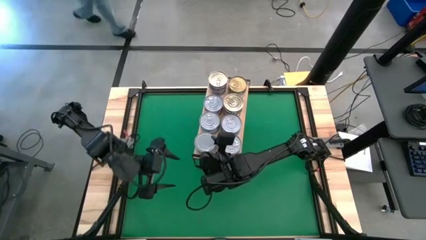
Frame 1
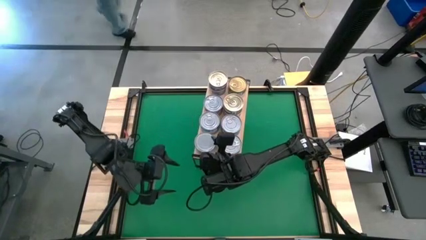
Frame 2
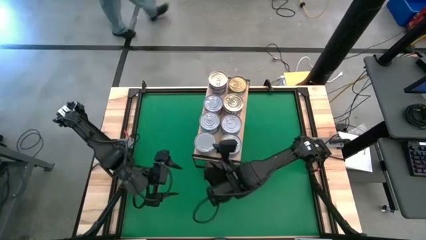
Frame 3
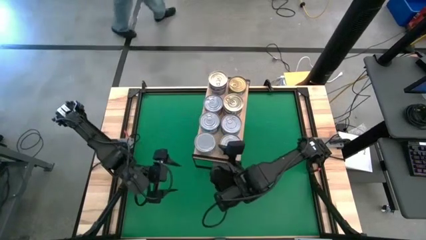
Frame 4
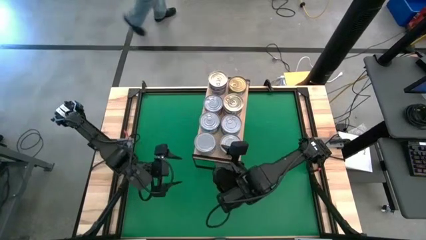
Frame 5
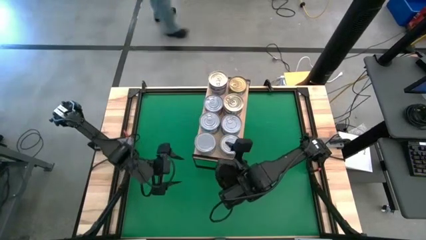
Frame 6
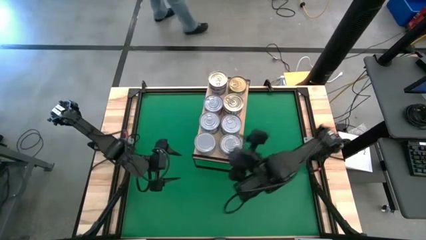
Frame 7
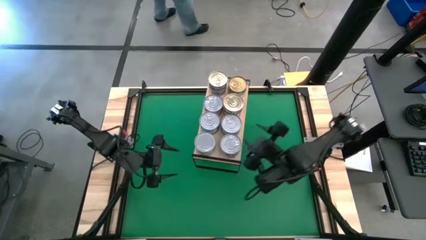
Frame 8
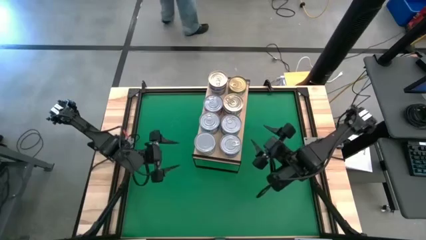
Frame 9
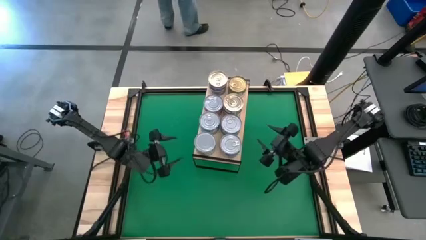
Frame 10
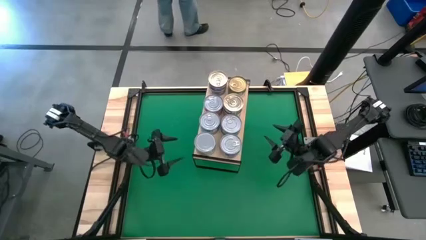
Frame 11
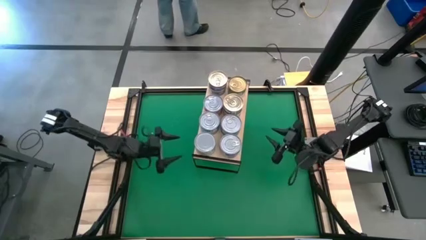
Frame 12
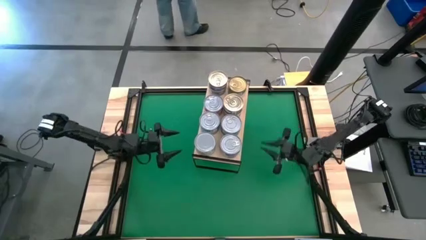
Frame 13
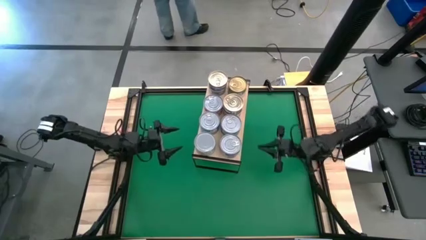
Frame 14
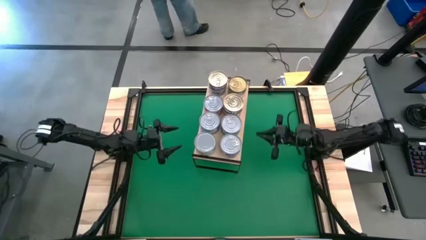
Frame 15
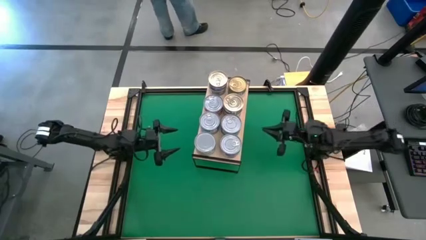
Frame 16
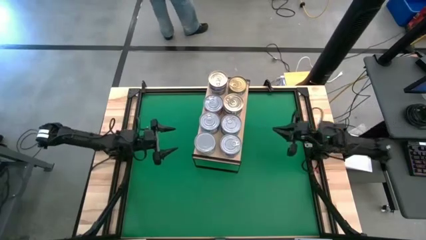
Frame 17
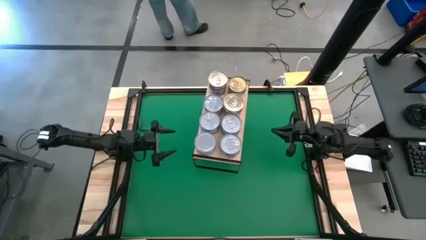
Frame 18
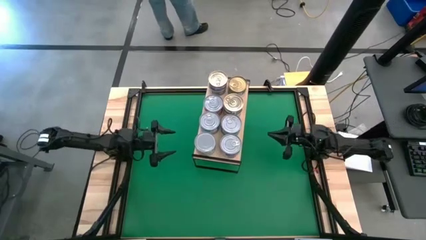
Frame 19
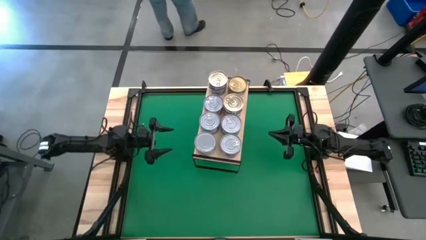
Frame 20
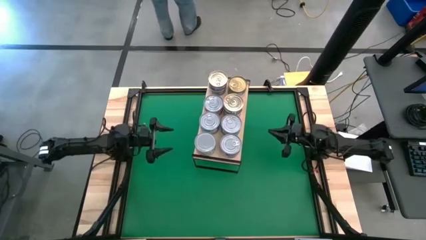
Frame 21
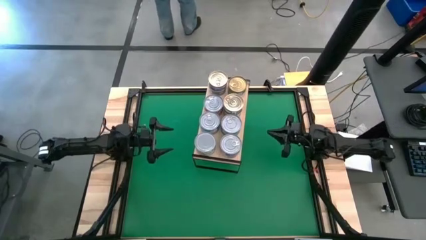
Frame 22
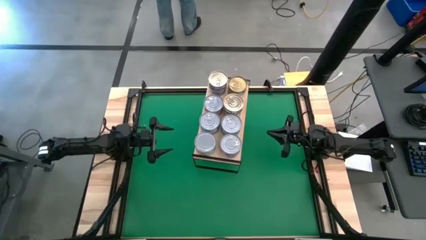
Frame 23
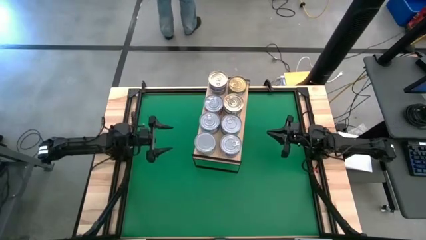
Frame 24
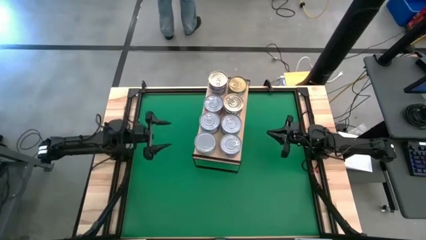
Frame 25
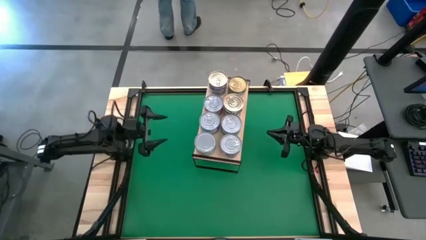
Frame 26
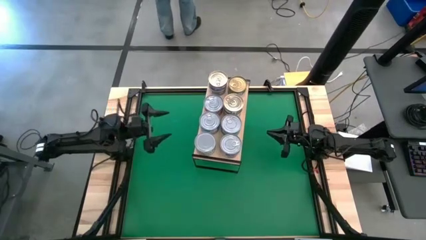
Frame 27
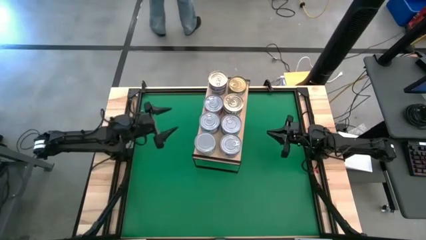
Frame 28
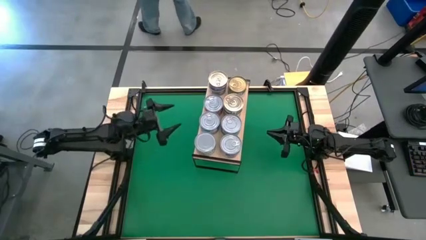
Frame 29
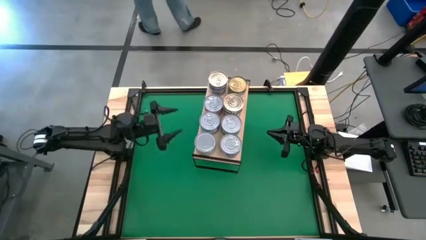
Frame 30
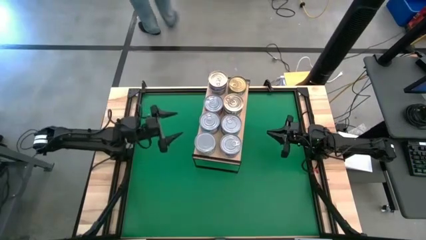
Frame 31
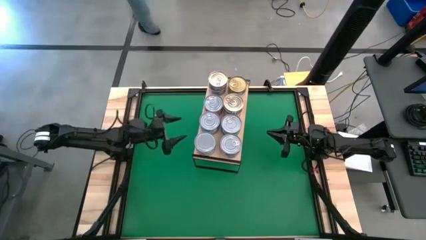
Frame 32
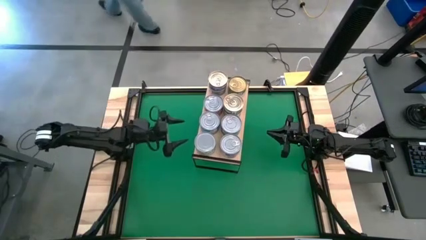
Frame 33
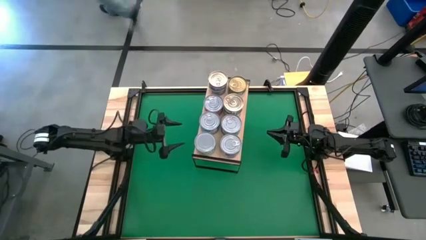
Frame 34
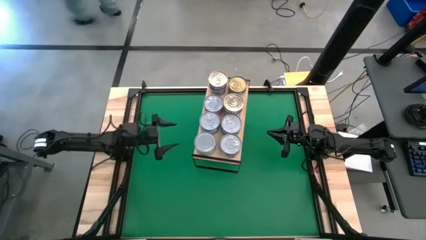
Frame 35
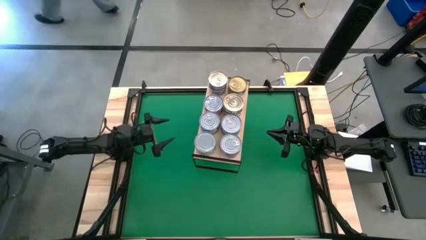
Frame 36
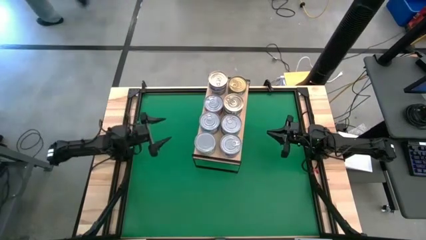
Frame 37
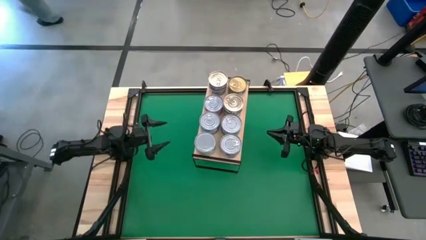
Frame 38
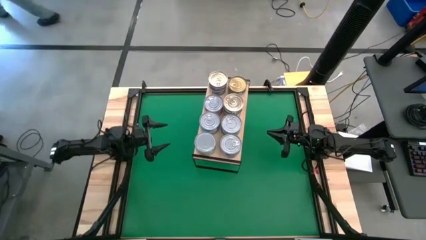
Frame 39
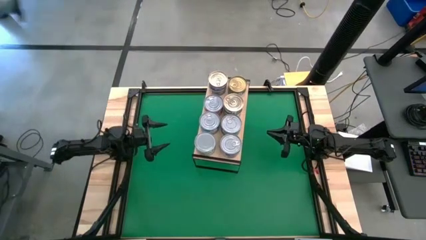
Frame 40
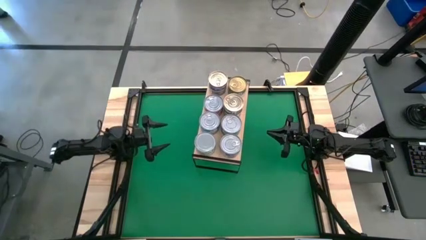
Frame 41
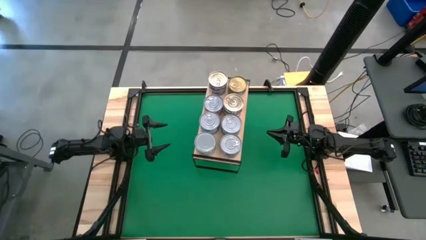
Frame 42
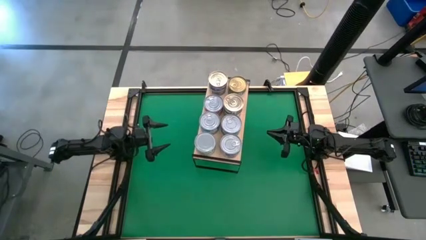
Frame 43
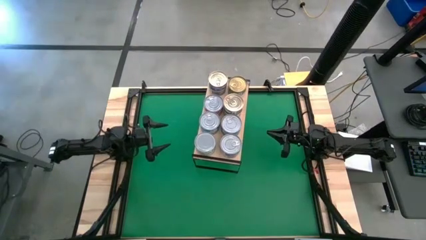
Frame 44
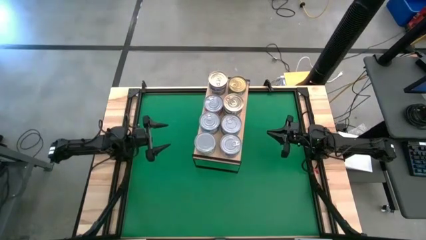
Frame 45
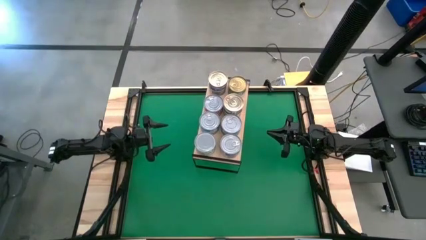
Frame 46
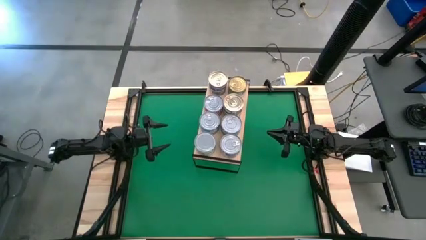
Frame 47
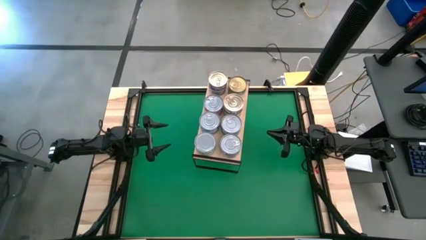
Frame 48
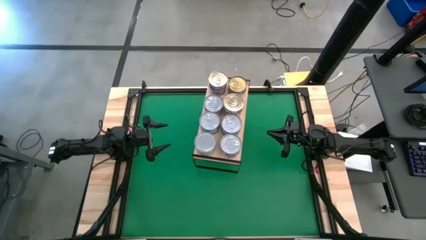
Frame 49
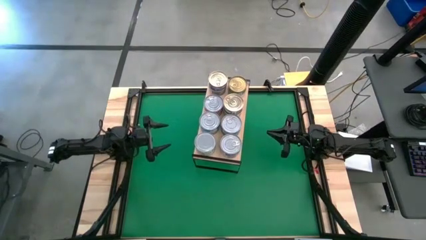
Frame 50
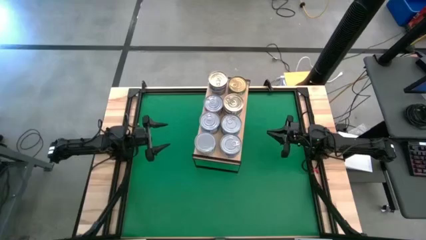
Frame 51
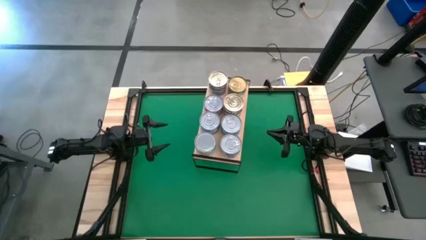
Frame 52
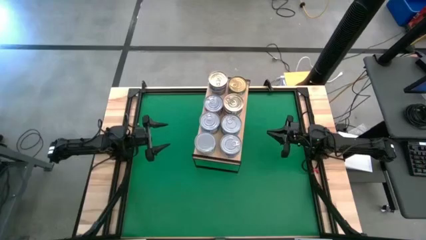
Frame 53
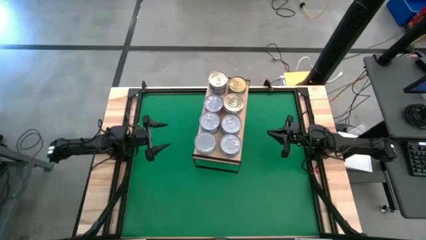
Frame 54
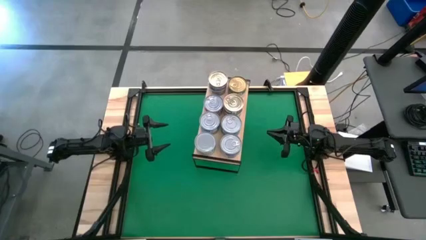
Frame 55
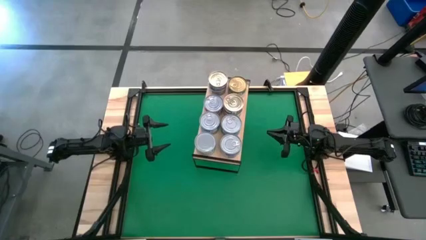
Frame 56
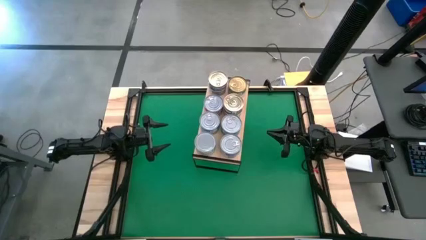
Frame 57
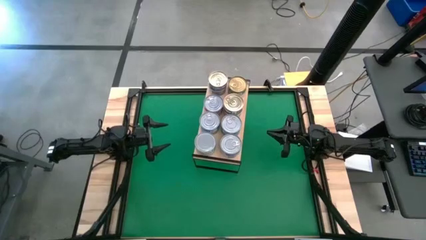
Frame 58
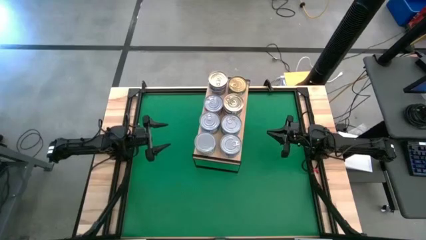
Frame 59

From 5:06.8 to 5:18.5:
Task: Stack canned seafood by type on shelf
Return to Home Position
